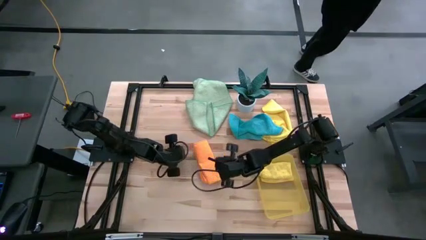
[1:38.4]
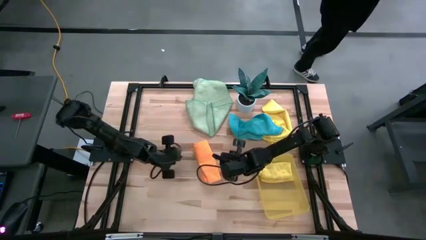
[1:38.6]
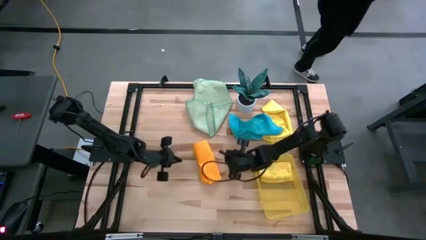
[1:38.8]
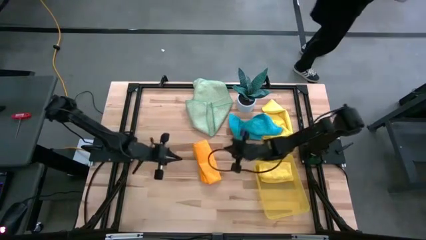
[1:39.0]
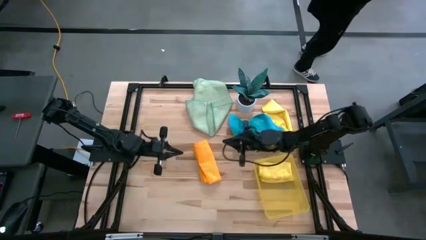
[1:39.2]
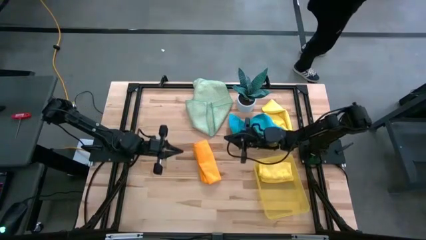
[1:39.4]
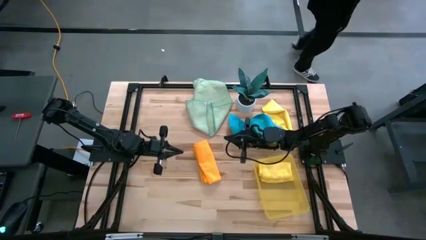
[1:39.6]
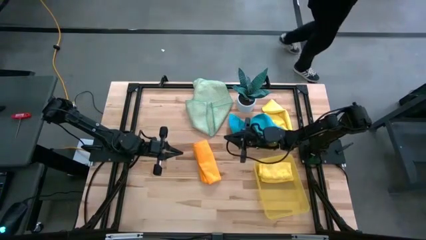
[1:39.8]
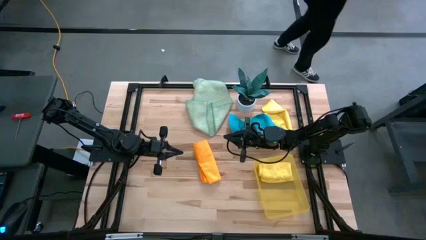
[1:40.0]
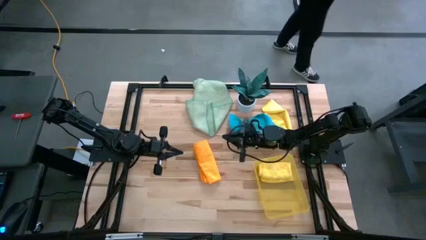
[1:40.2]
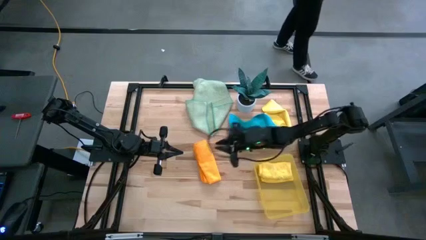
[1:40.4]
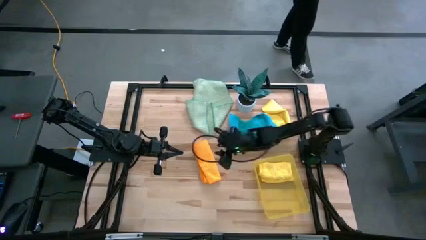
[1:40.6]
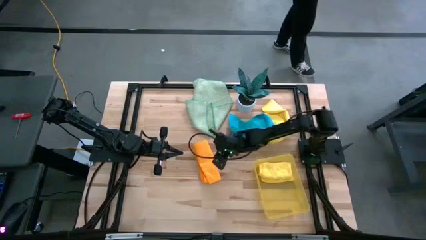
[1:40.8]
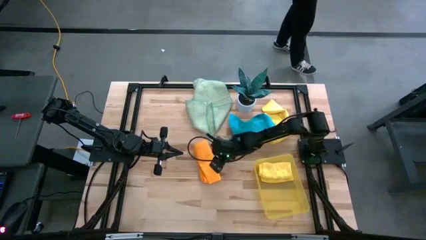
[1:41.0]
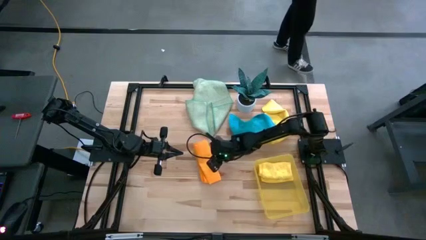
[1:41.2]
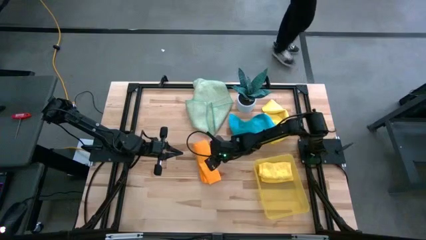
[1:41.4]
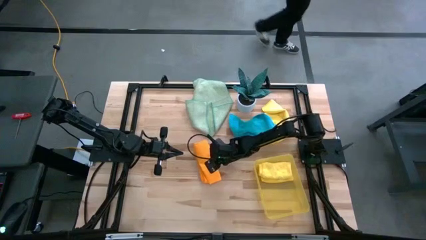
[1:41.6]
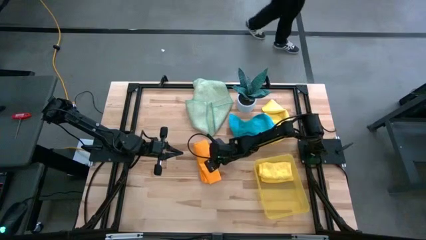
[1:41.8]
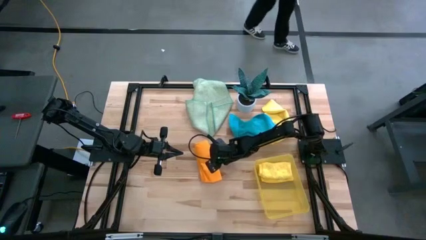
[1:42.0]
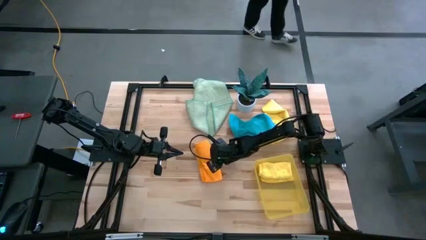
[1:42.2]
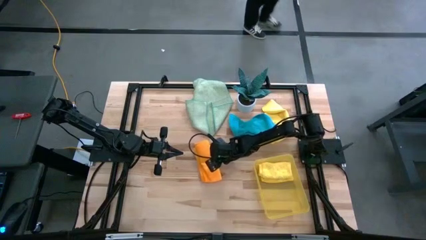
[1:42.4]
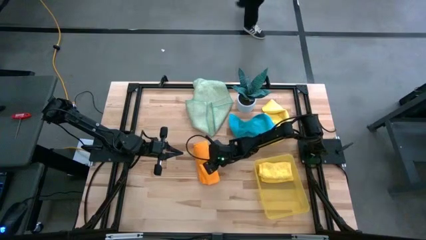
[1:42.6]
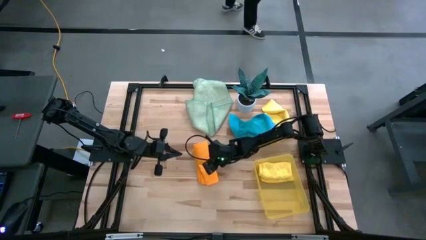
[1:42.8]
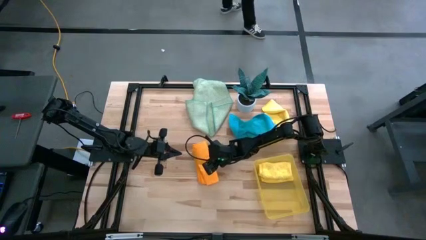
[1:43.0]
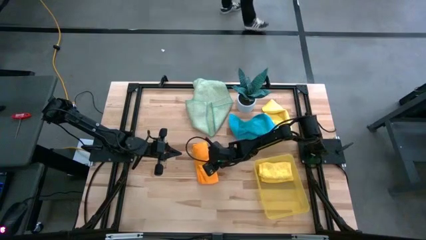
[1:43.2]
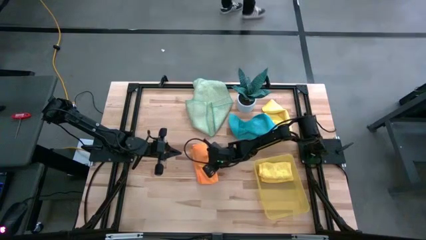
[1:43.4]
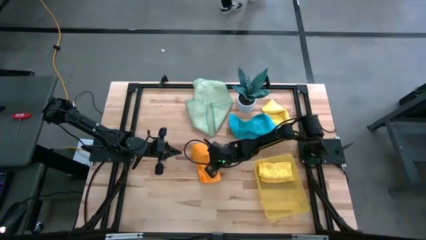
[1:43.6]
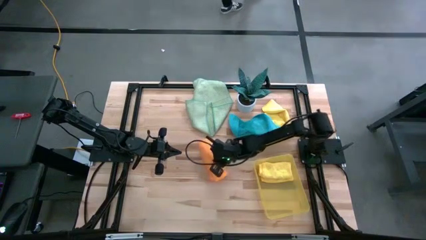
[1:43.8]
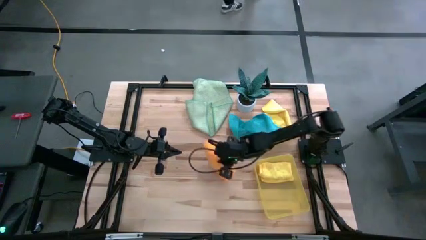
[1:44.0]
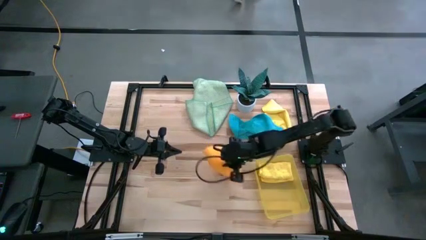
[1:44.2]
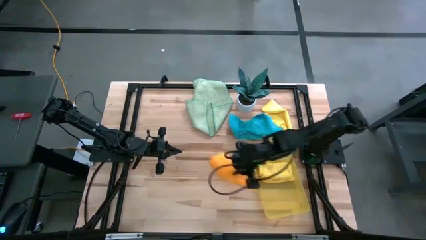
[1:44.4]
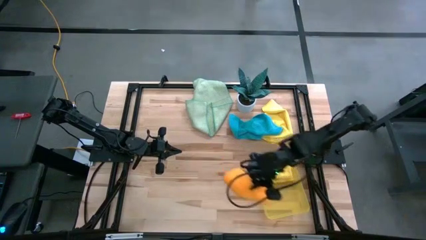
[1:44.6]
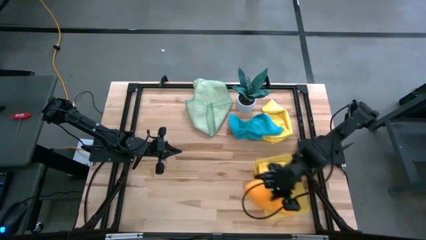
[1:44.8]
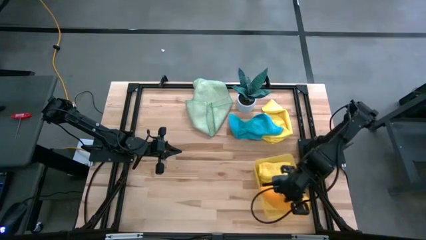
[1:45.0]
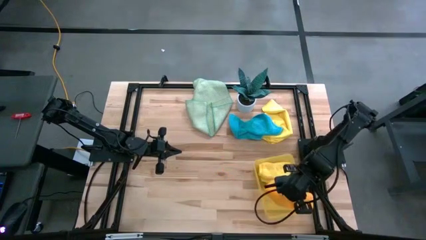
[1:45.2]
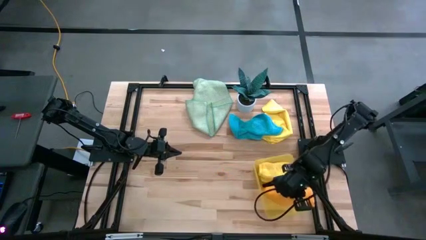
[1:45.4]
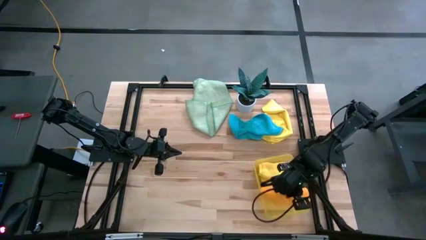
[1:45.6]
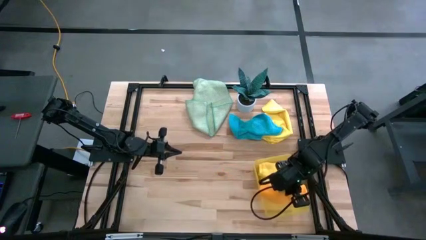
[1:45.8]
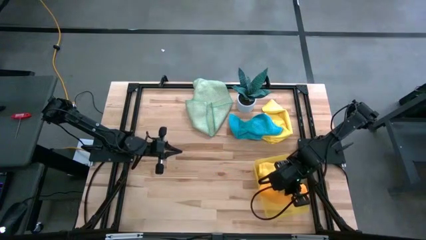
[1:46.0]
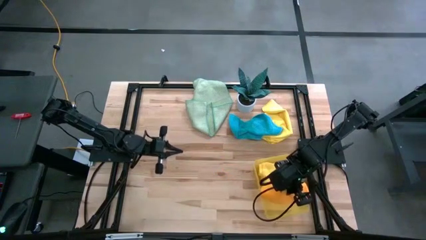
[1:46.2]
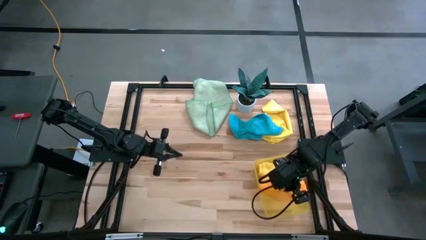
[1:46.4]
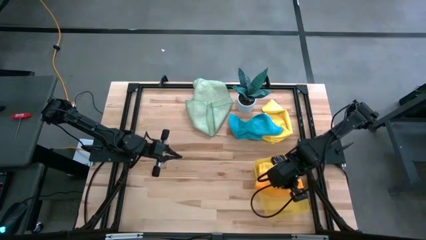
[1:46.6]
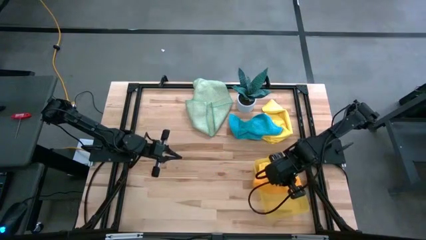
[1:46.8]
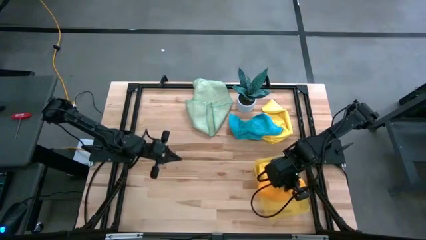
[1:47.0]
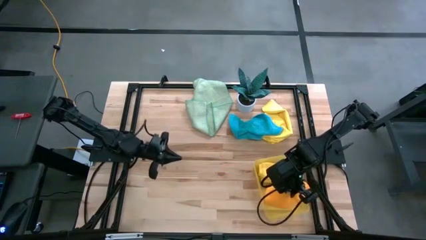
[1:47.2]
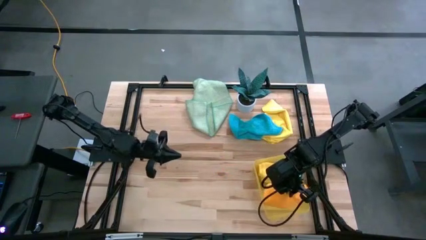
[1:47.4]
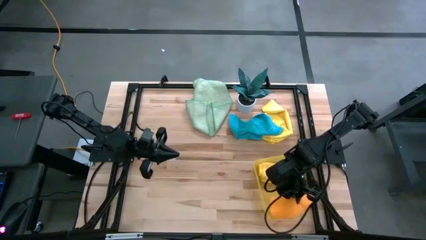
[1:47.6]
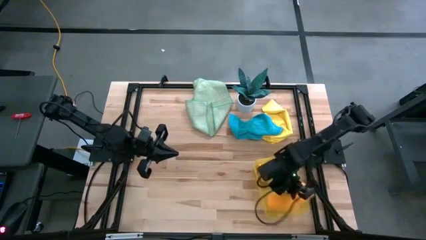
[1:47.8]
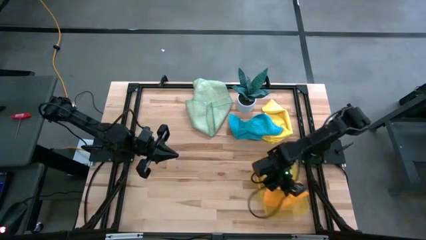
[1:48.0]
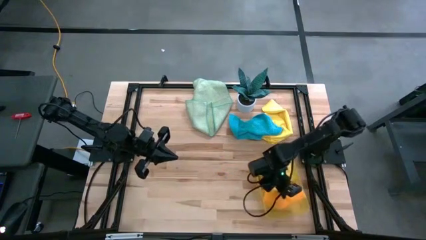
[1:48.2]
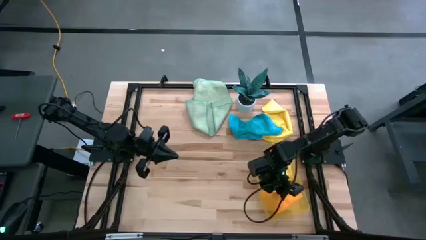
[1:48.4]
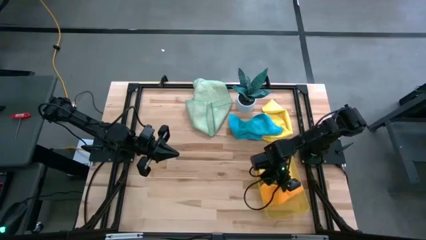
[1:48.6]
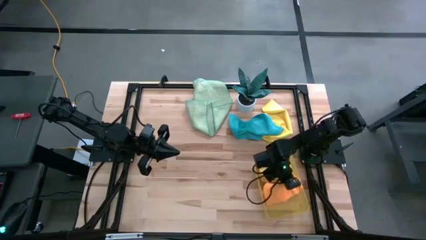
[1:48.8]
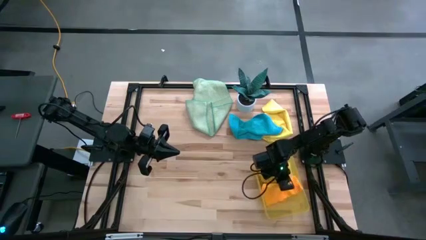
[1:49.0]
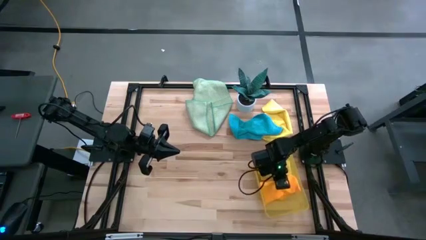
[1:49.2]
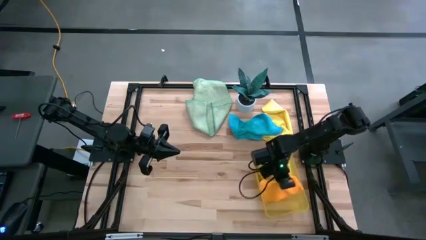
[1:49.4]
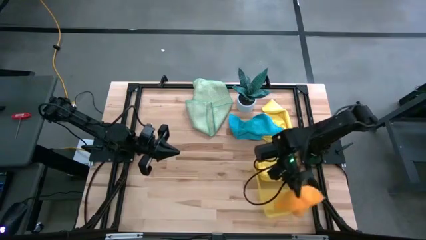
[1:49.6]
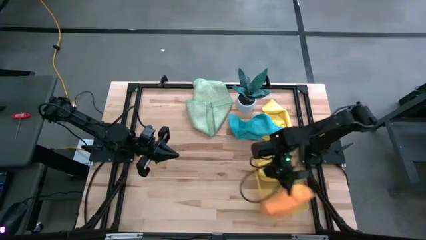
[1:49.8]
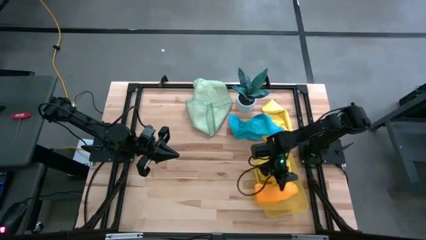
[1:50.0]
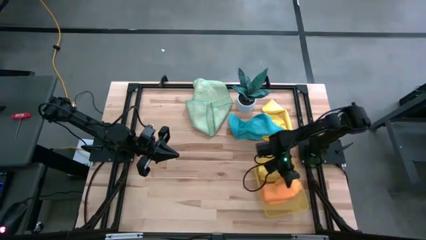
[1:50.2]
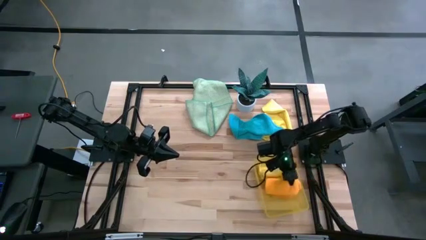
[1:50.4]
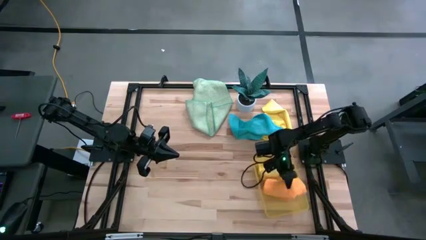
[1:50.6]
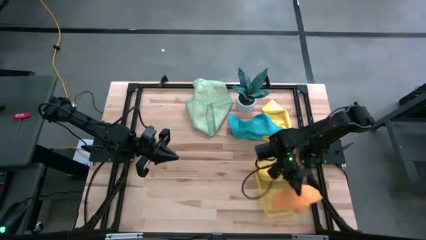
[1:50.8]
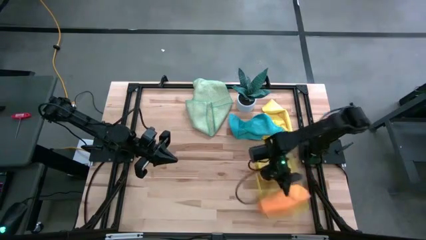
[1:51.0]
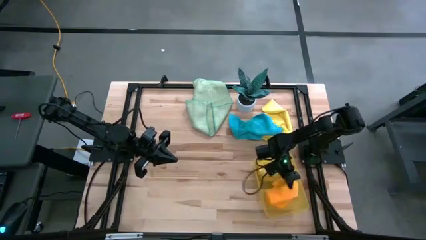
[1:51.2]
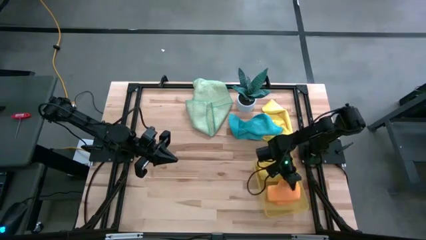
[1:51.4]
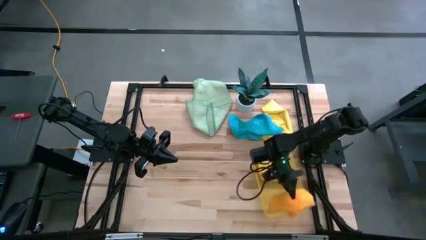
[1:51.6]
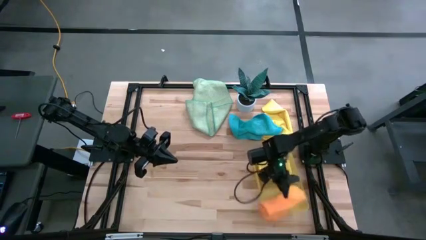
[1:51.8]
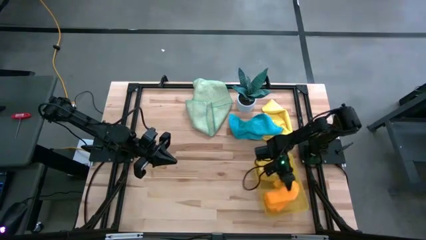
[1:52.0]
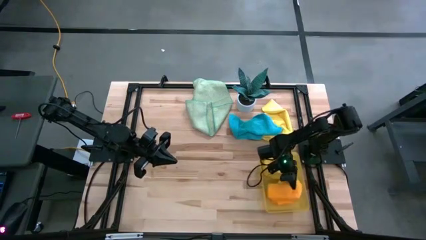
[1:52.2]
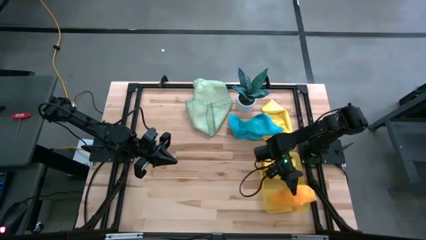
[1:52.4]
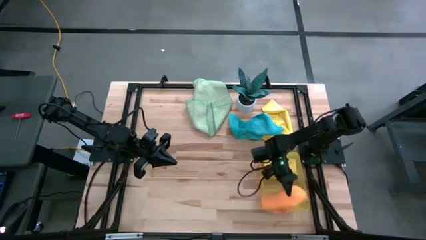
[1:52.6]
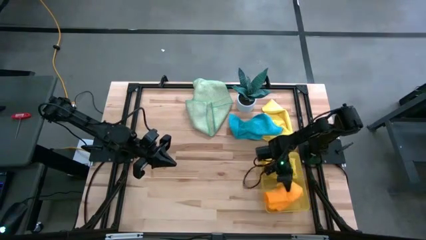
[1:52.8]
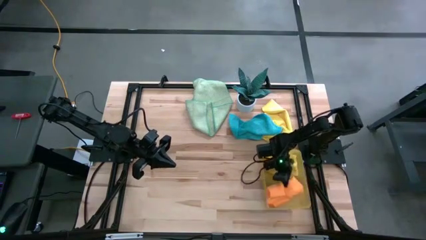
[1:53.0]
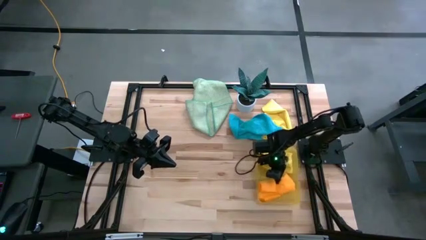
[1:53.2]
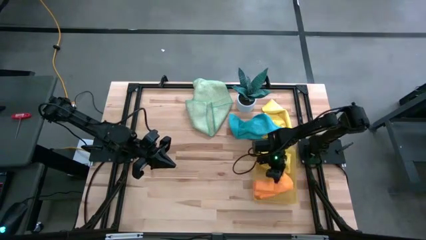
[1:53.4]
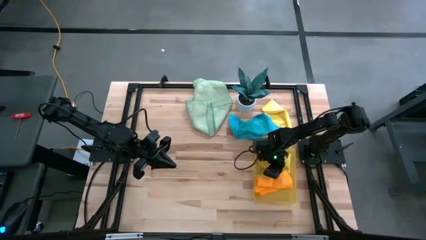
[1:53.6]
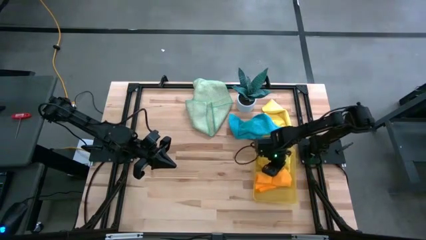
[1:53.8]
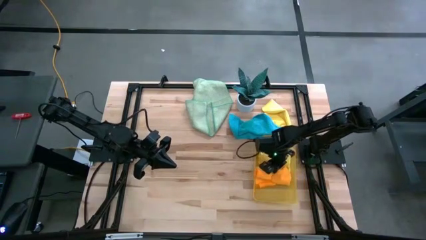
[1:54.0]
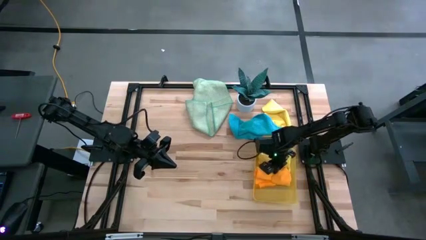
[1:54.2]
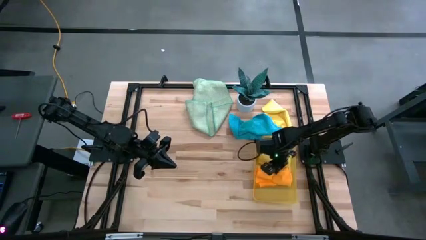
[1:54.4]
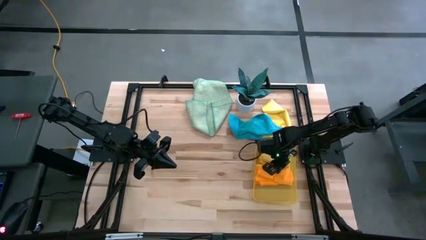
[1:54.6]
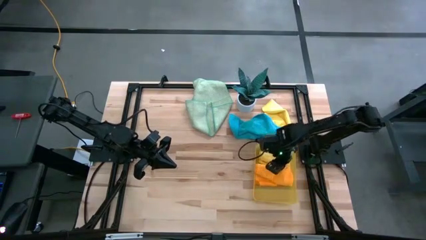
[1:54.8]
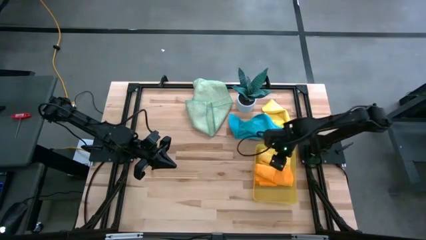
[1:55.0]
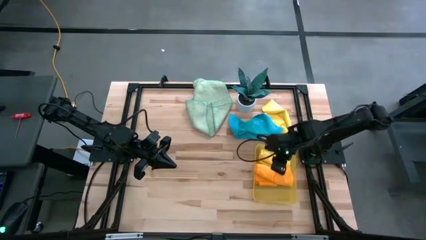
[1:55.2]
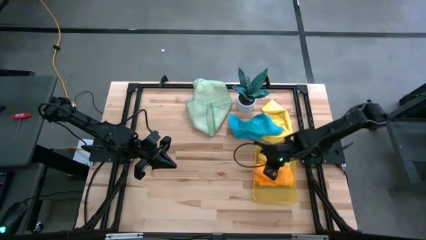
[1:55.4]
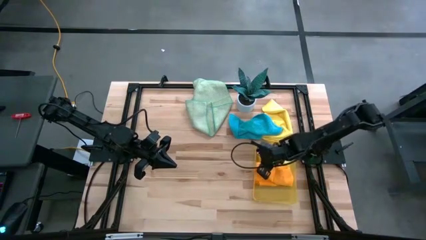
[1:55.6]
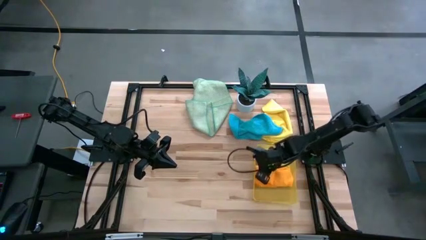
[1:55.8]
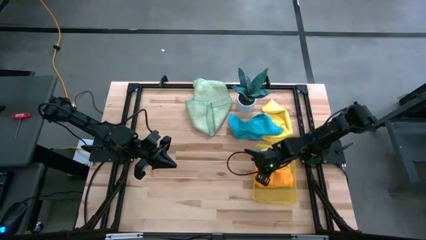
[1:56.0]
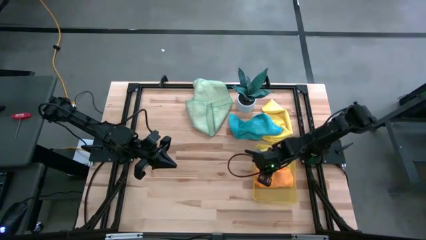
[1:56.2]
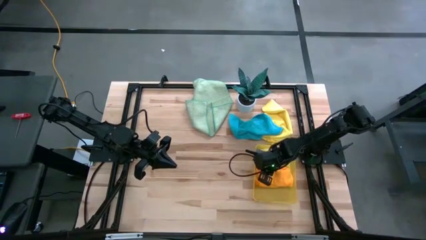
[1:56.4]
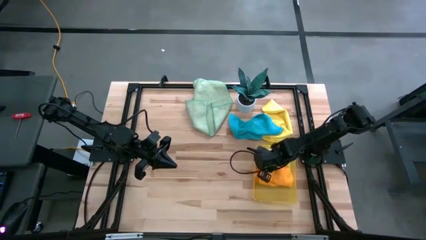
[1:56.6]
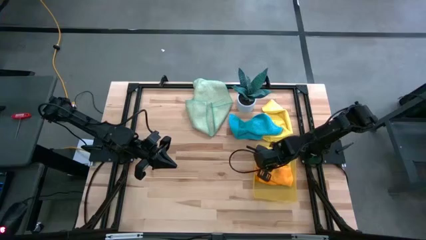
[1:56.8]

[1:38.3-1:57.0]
Task: Fold microfiber towels
Put the orange microfiber cloth into the yellow bin
